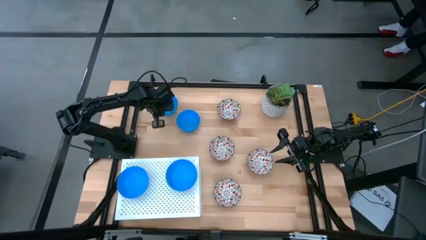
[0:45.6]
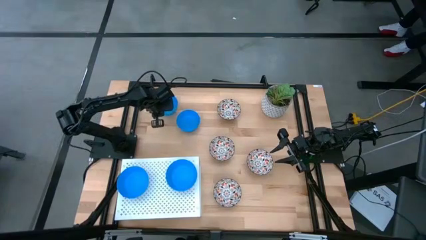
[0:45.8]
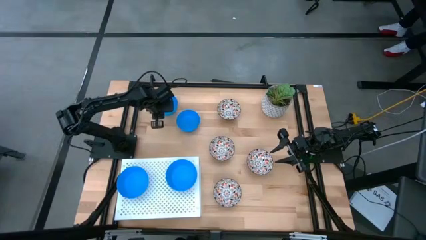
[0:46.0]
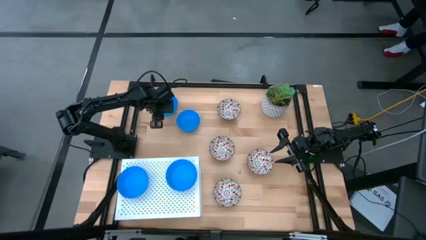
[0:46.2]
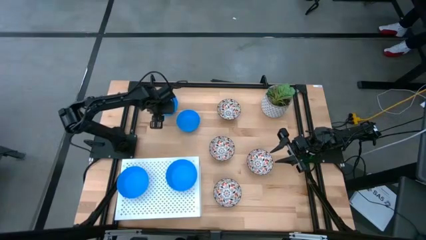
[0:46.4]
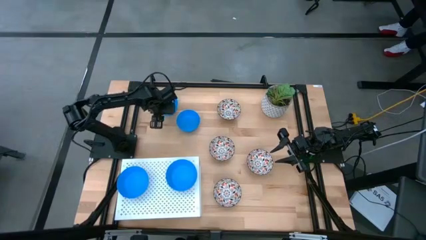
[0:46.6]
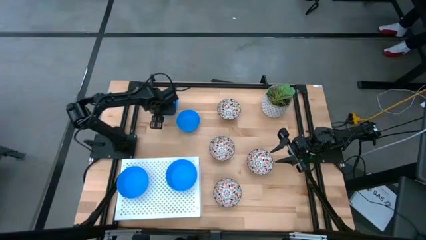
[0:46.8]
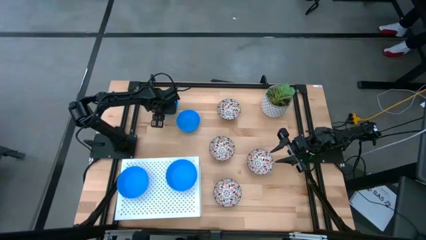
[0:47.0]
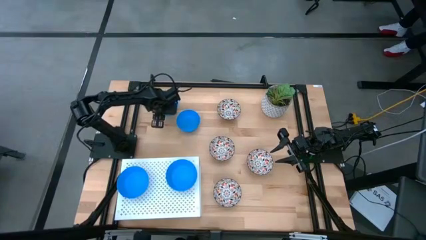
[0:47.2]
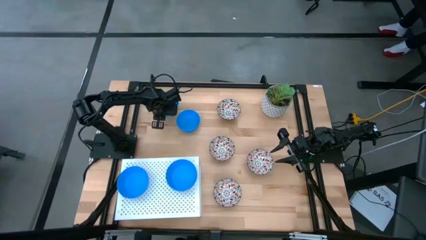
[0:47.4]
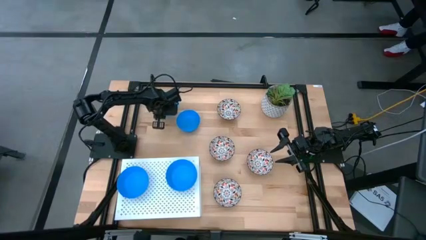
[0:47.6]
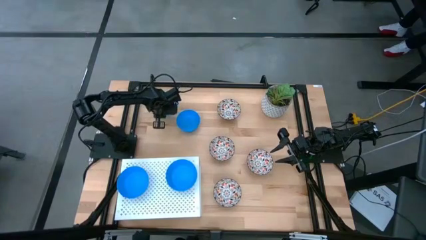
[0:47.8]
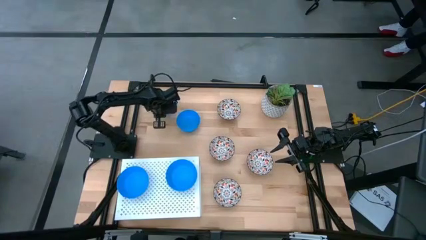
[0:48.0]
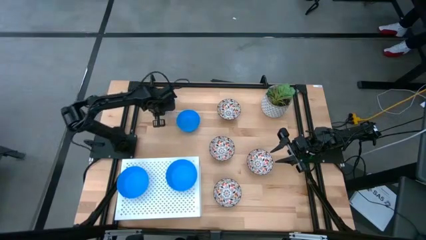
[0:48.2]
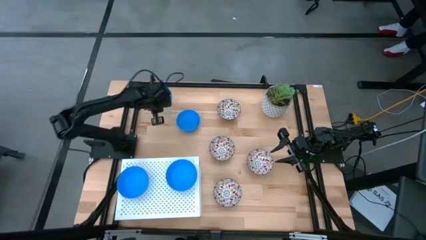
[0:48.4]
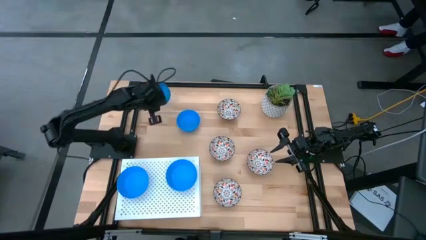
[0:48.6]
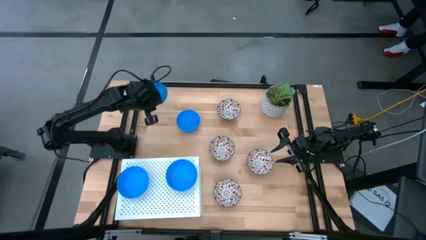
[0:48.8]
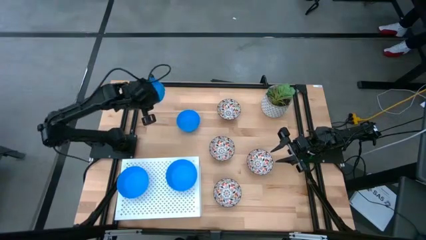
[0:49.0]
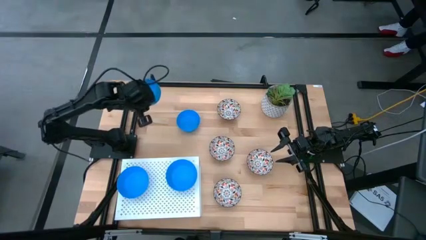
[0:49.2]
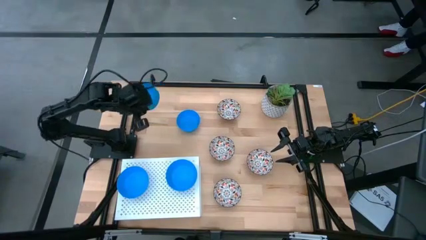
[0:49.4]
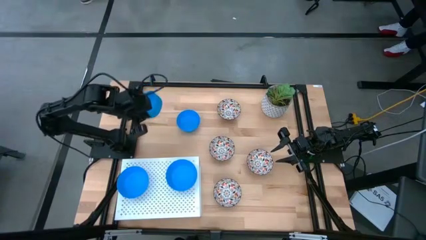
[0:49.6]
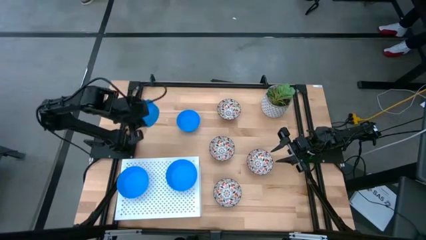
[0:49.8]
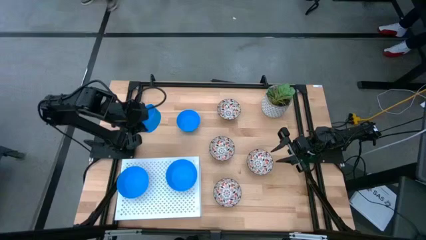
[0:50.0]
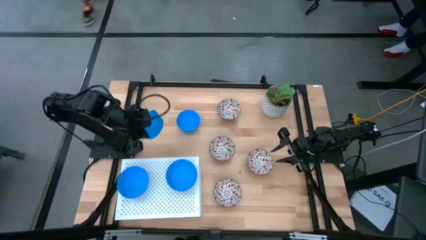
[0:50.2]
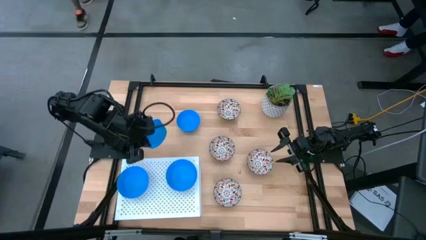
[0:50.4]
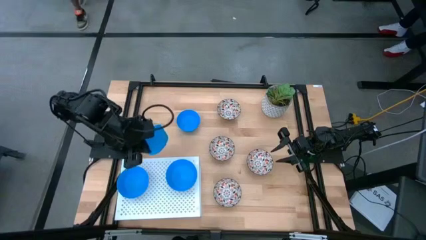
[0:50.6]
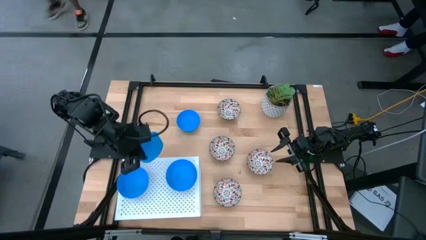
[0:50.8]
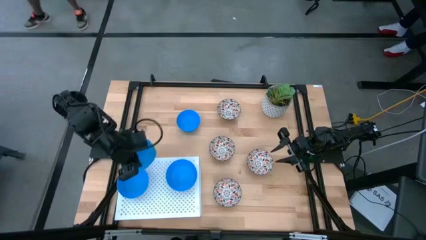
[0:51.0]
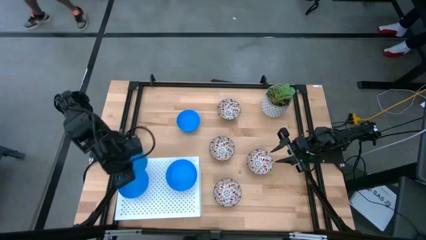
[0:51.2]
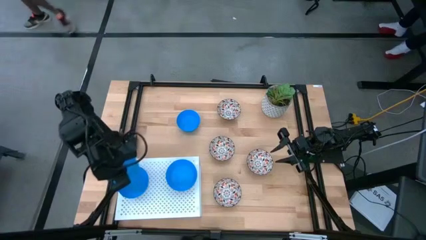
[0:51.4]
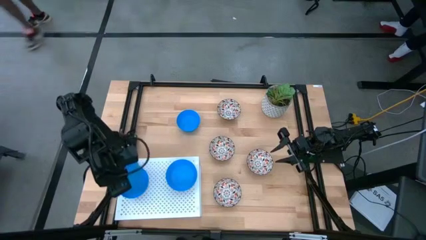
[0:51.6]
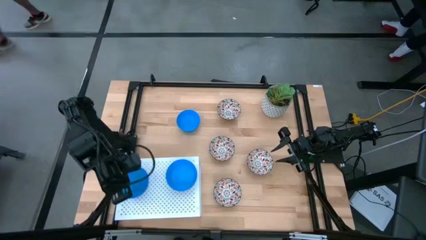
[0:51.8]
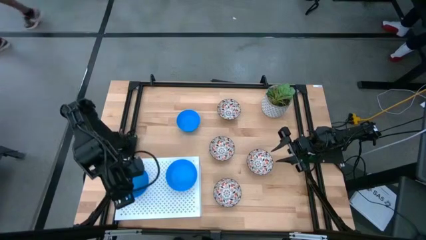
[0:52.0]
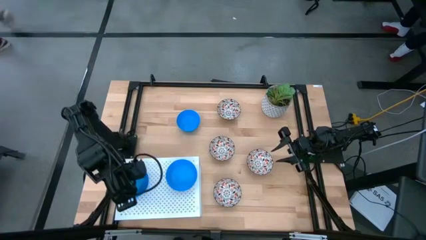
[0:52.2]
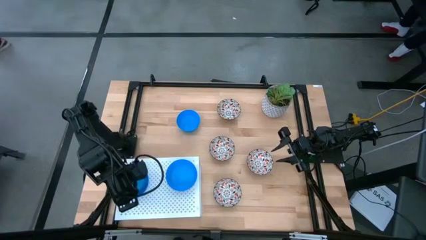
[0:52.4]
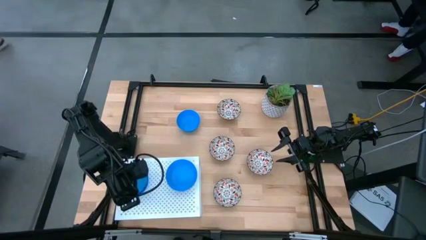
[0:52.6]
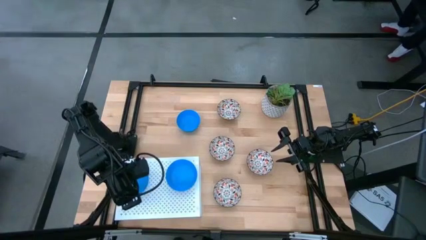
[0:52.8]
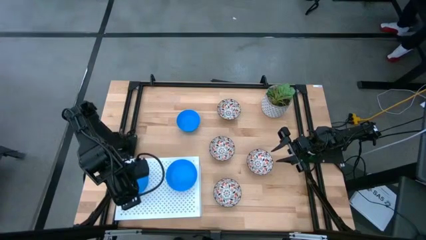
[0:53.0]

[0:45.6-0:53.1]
Task: Pick & Place Mini bowls
Stack the blue bowl on top of the left blue bowl on the shelf

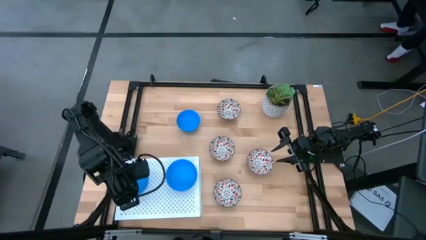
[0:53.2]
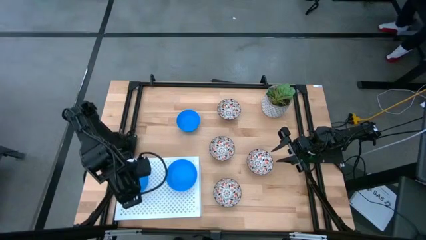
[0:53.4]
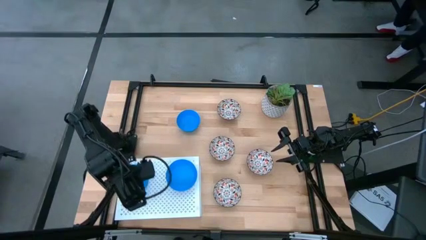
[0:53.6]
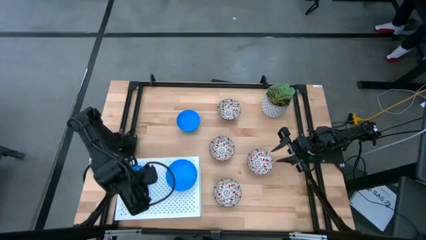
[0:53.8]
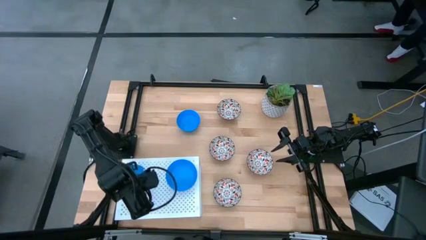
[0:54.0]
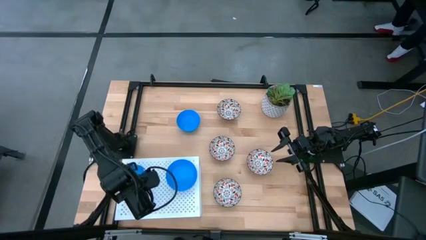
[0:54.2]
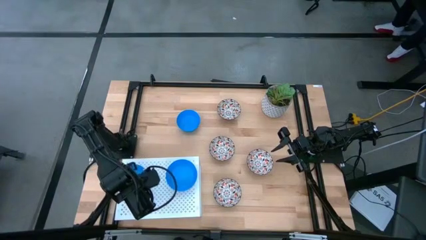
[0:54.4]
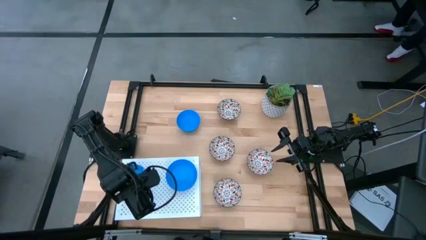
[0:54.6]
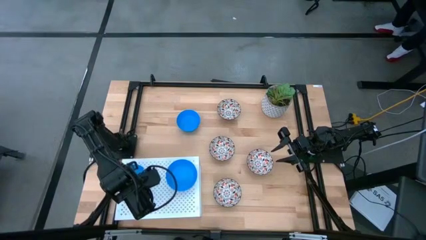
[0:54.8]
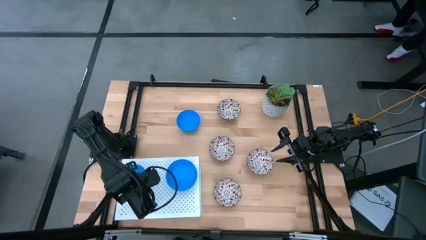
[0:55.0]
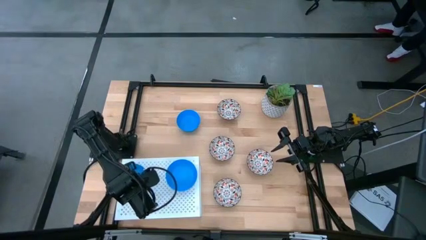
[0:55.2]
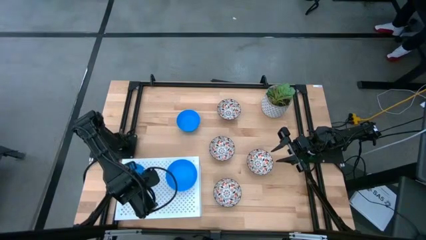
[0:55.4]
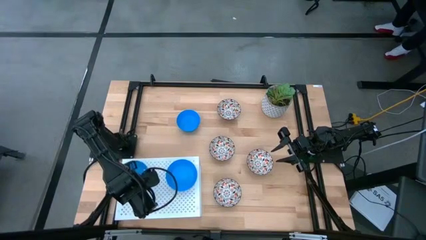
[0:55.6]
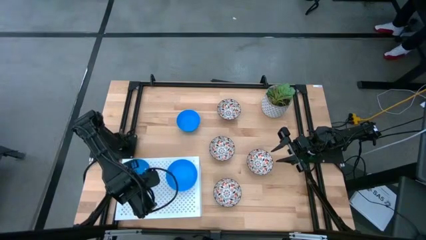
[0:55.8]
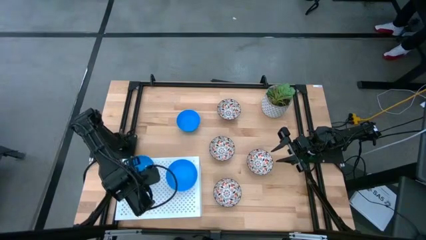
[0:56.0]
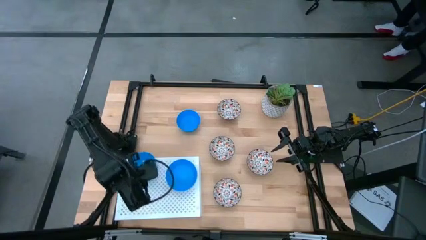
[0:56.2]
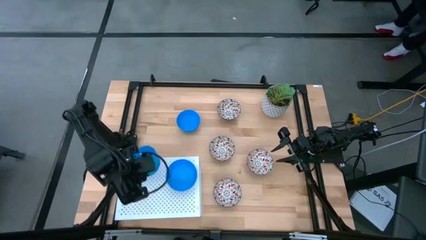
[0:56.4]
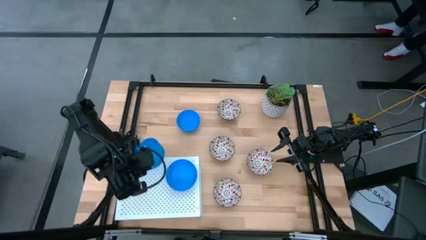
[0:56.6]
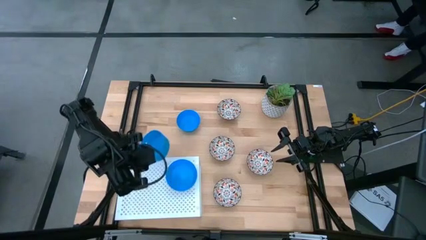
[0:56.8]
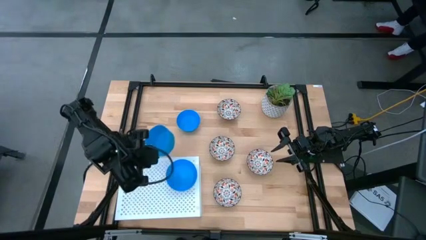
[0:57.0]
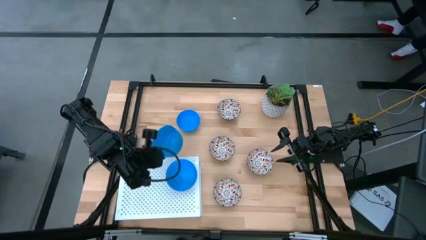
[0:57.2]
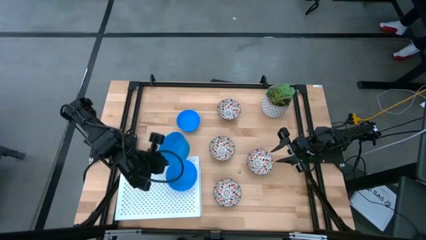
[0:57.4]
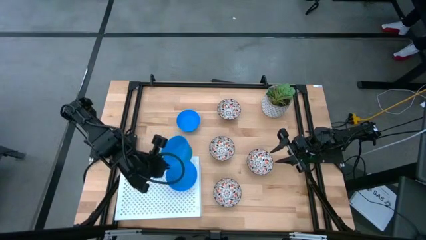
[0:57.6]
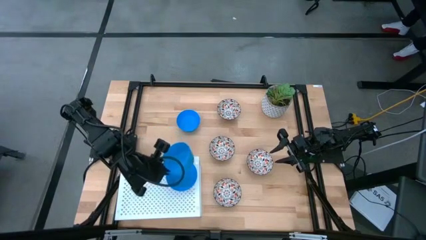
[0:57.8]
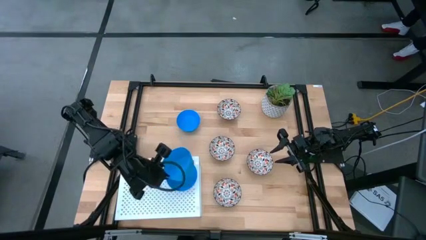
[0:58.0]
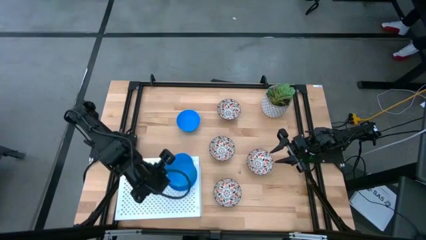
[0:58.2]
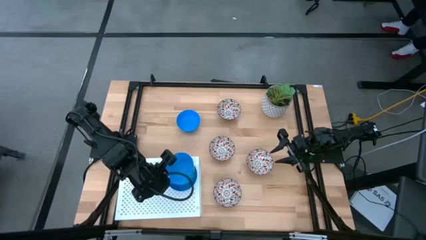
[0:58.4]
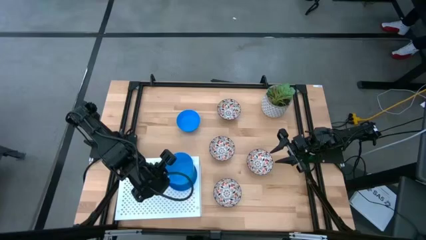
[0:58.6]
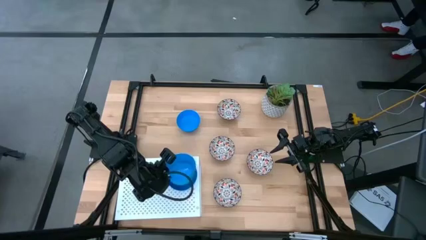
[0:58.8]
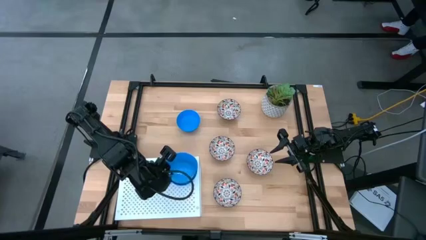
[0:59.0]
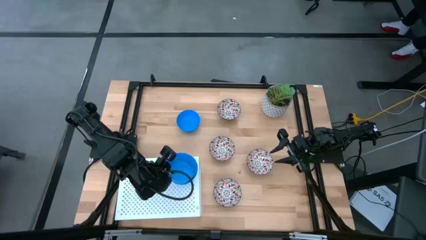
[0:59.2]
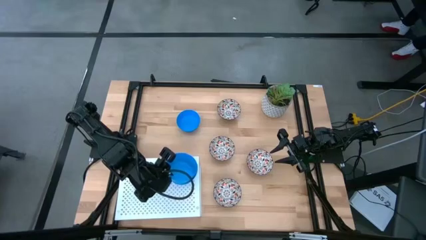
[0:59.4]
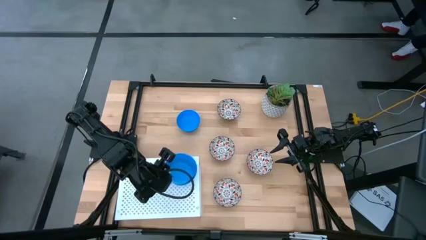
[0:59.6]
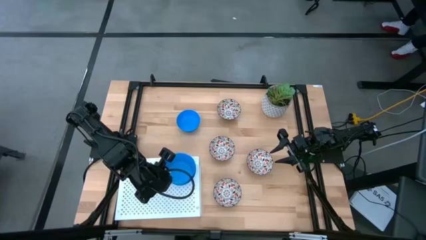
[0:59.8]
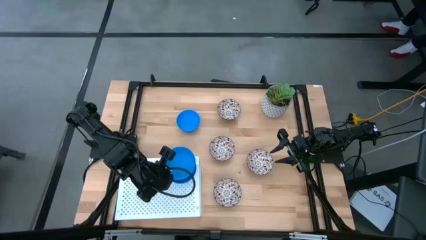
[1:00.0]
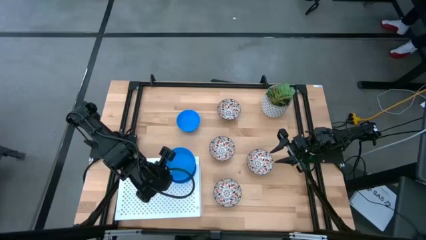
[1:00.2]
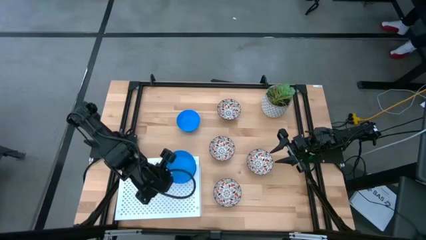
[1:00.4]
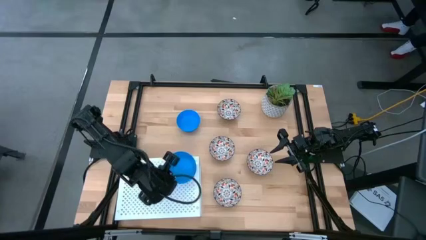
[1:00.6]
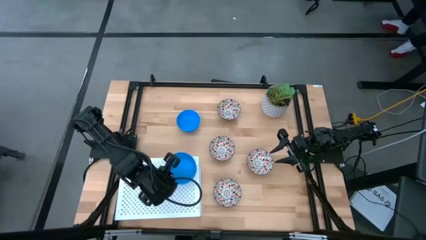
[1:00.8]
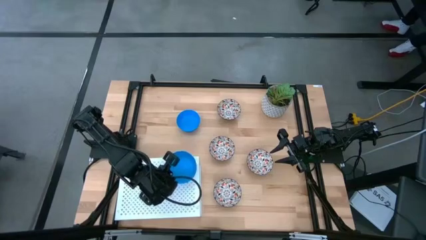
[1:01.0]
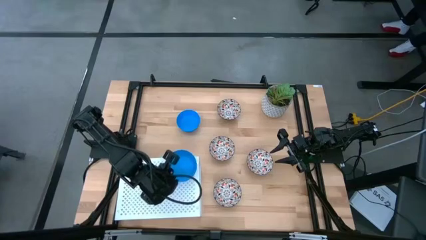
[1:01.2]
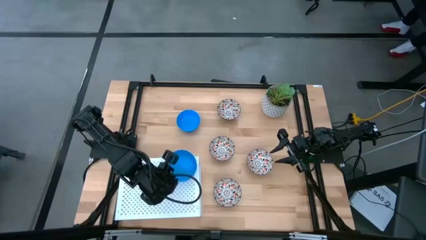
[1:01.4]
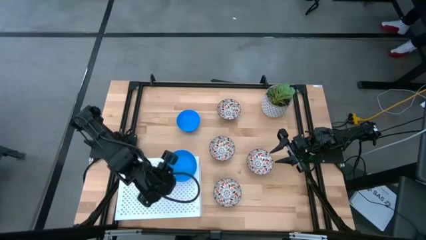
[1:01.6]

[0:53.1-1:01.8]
Stack the left stacked blue bowls on top of the right stacked blue bowls on the shelf
